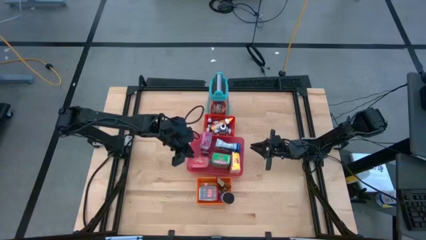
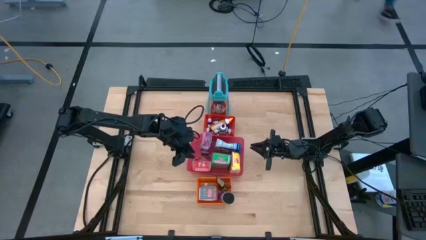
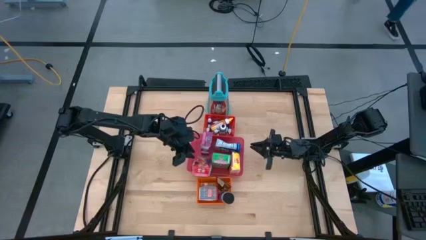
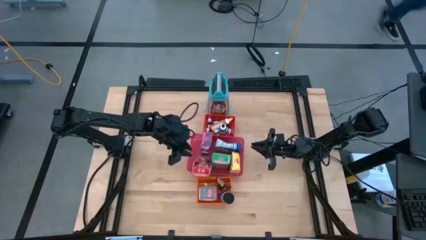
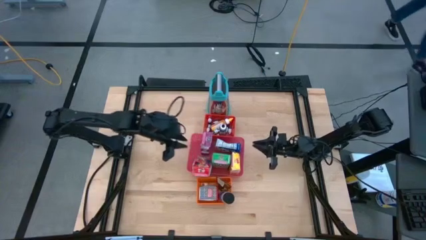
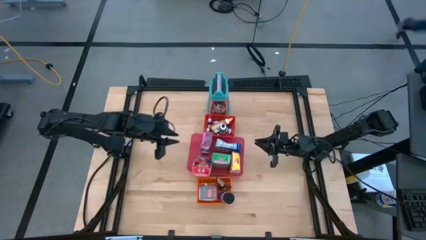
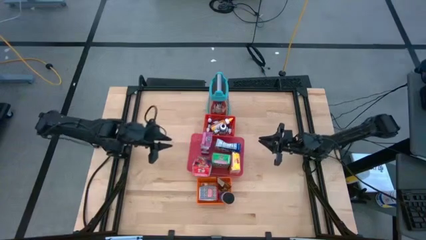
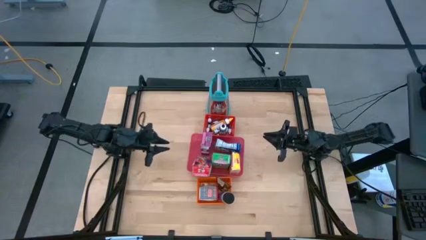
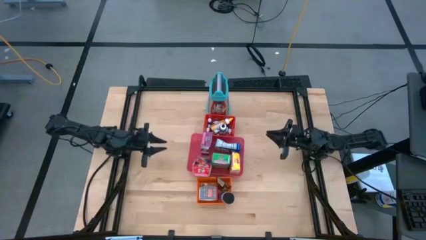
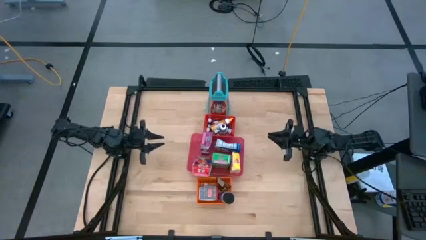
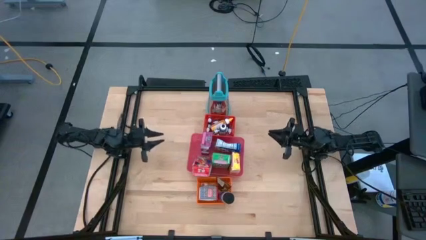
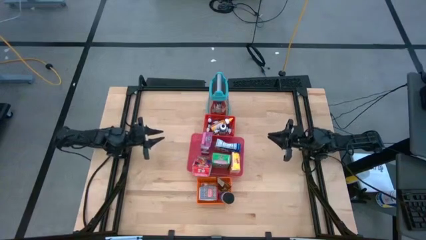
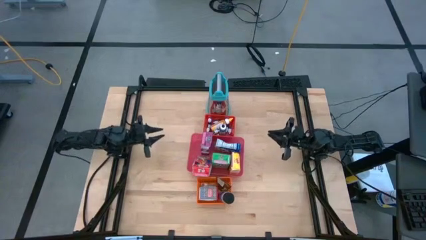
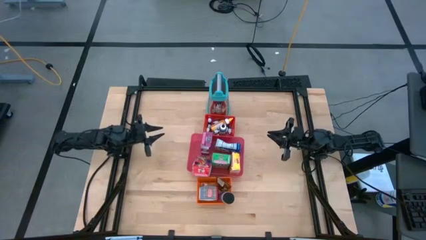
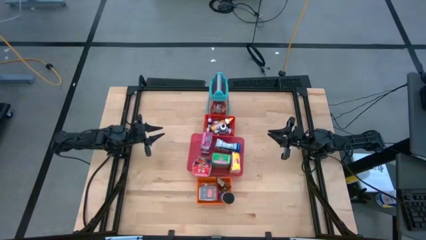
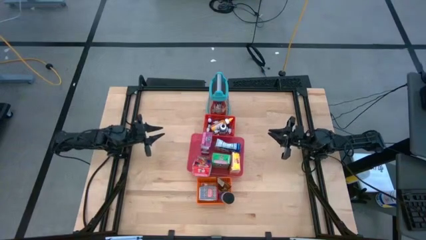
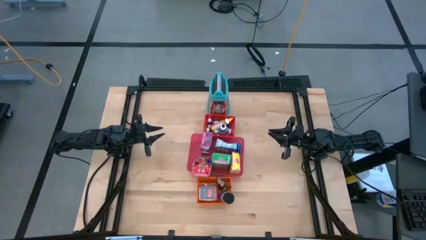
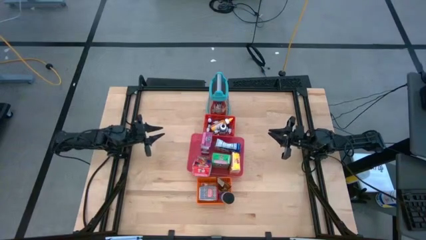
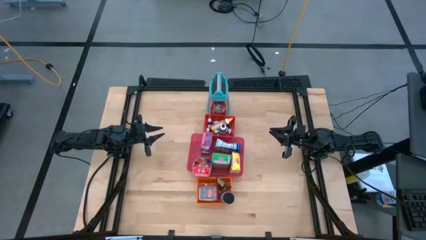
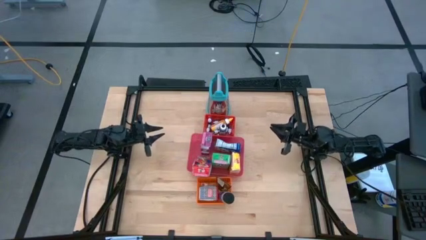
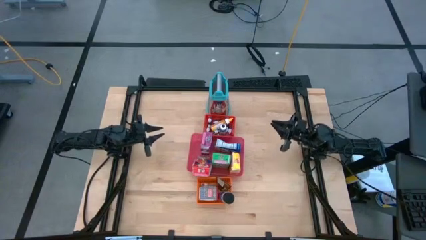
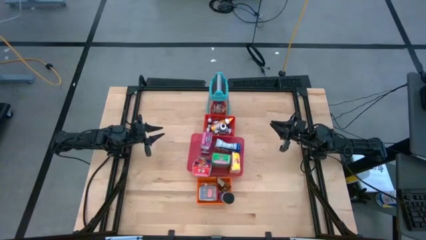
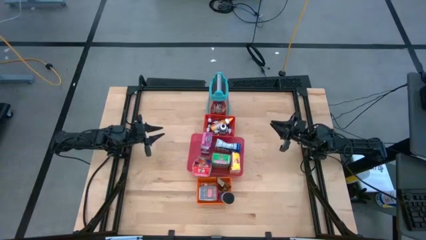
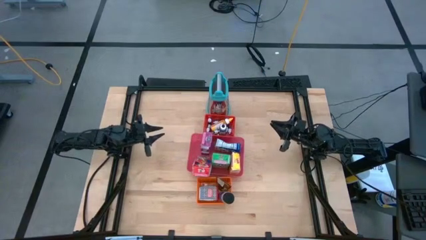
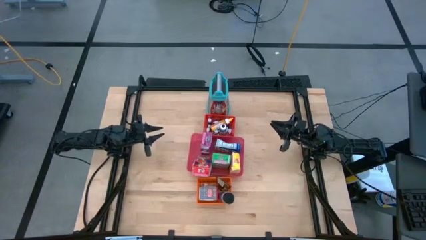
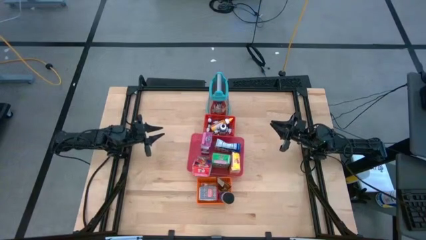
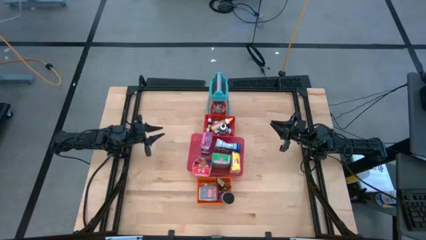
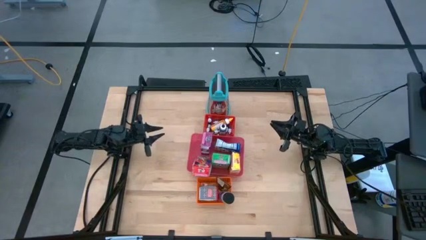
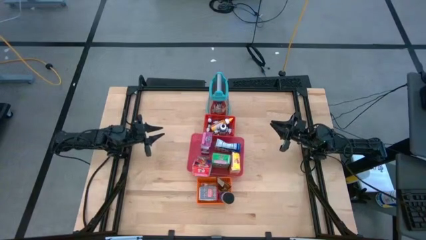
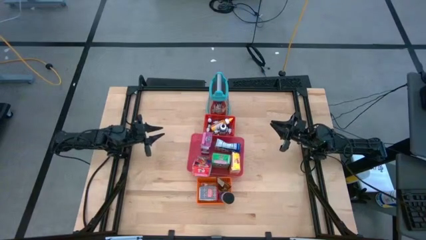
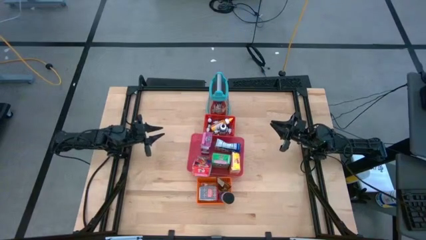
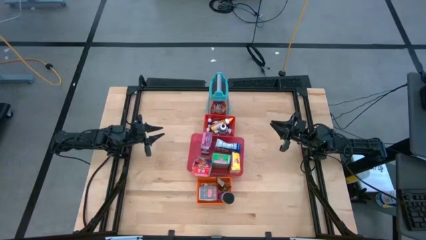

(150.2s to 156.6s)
Task: Pick & Place Kitchen Items
Return to Home Position
